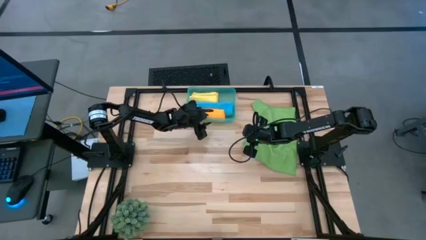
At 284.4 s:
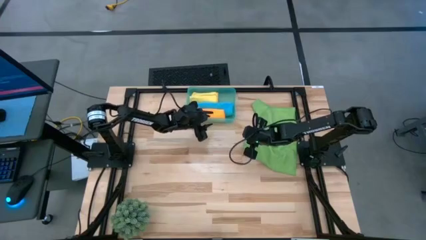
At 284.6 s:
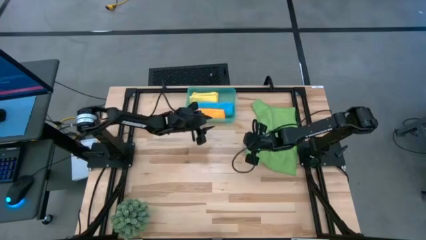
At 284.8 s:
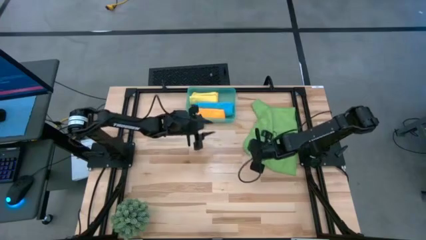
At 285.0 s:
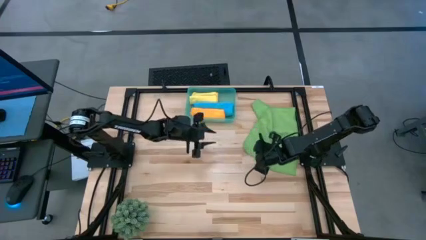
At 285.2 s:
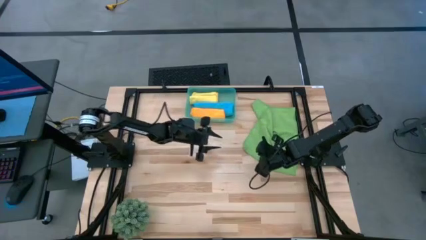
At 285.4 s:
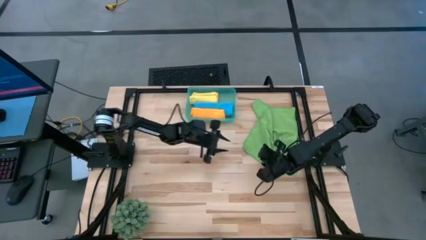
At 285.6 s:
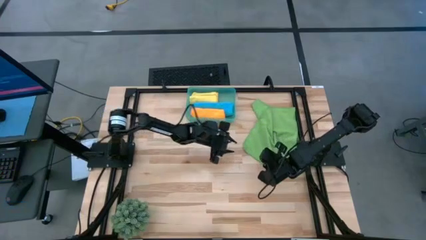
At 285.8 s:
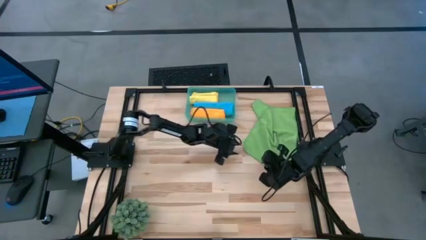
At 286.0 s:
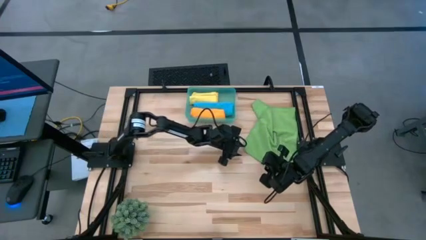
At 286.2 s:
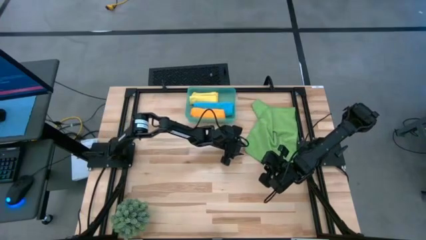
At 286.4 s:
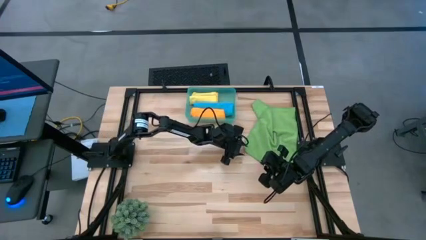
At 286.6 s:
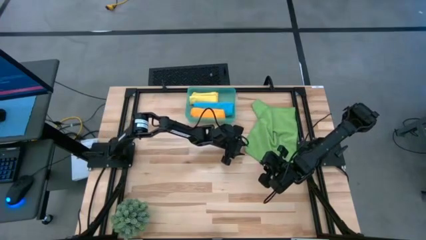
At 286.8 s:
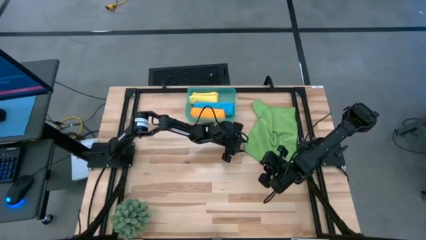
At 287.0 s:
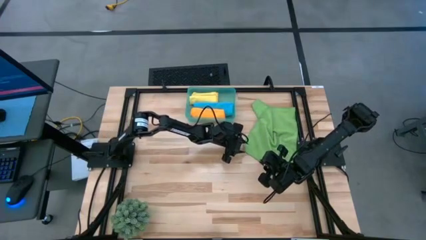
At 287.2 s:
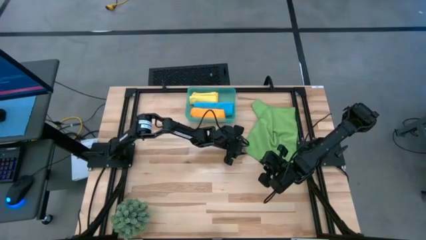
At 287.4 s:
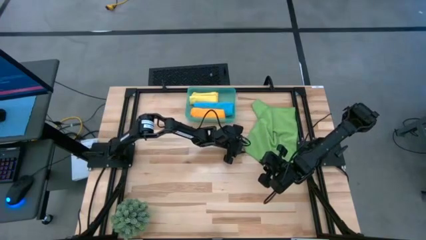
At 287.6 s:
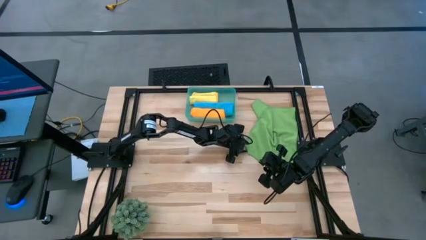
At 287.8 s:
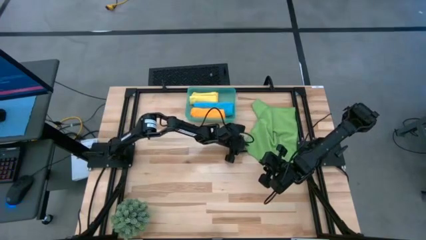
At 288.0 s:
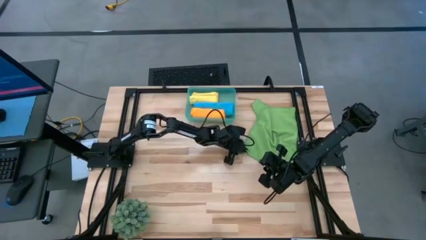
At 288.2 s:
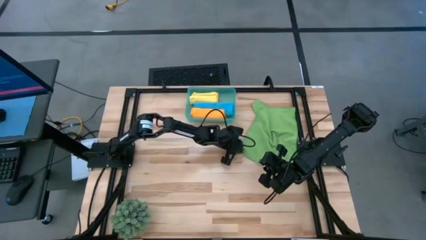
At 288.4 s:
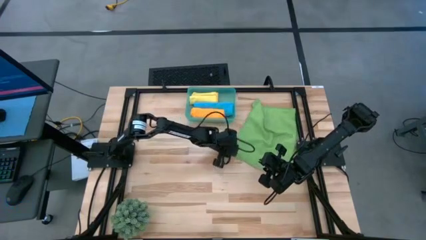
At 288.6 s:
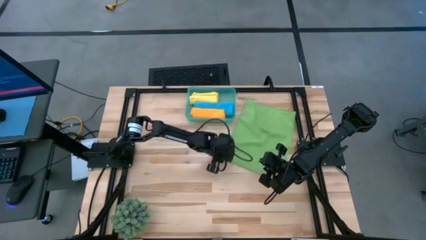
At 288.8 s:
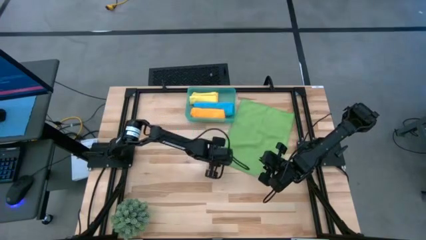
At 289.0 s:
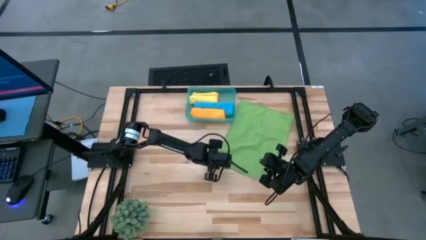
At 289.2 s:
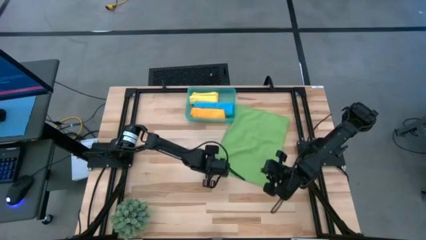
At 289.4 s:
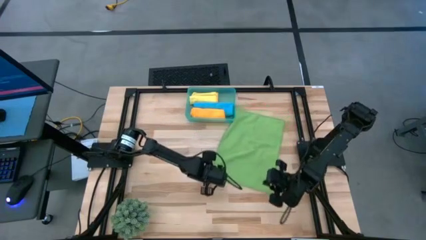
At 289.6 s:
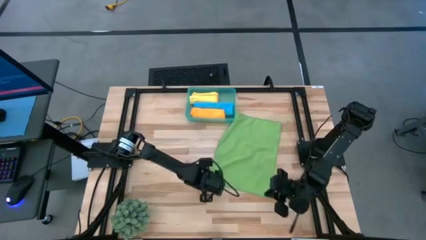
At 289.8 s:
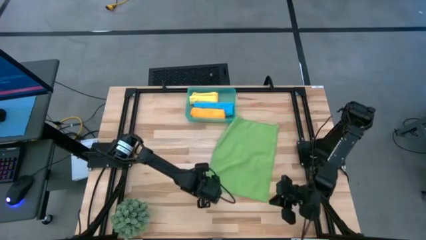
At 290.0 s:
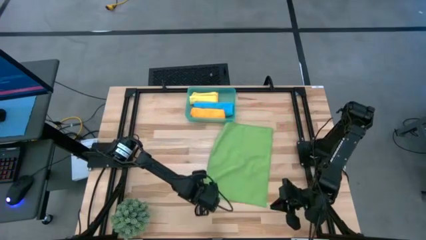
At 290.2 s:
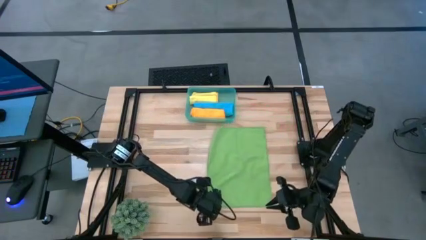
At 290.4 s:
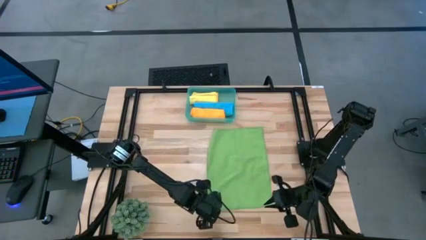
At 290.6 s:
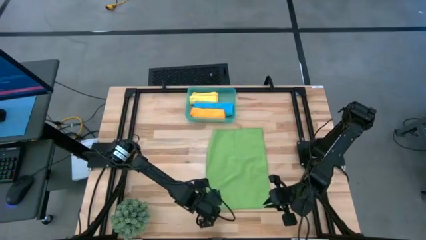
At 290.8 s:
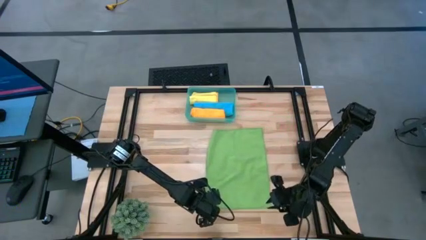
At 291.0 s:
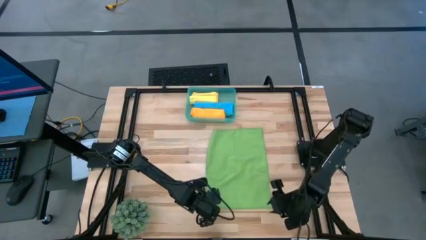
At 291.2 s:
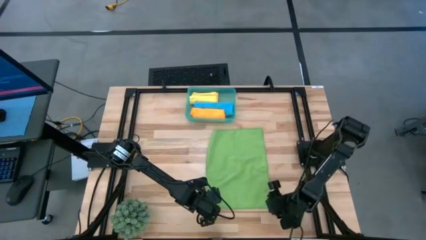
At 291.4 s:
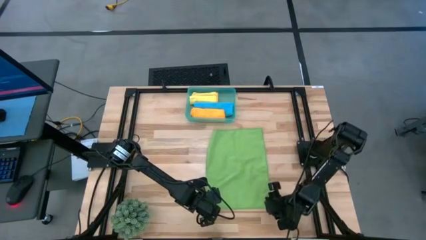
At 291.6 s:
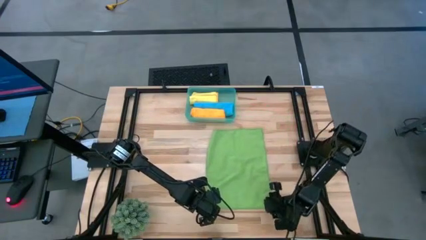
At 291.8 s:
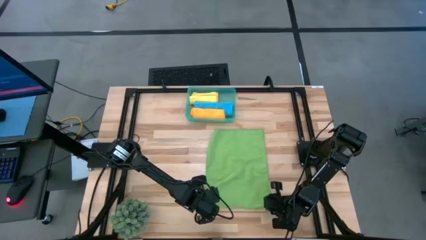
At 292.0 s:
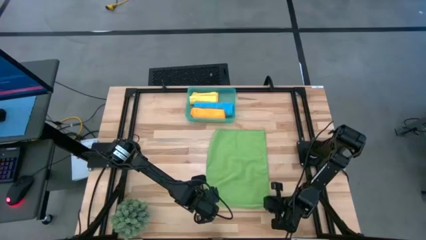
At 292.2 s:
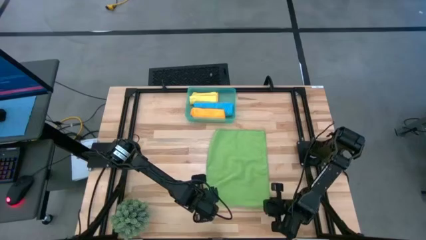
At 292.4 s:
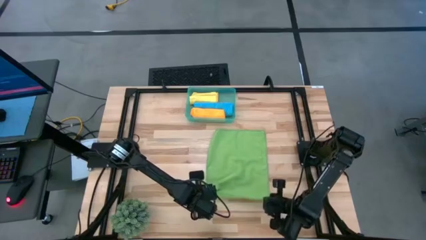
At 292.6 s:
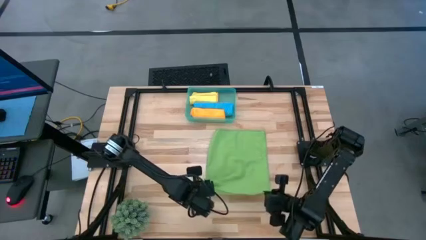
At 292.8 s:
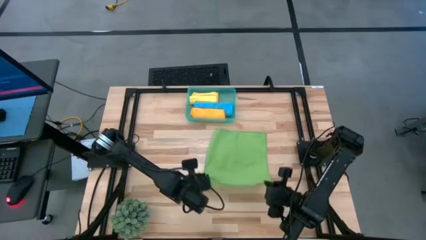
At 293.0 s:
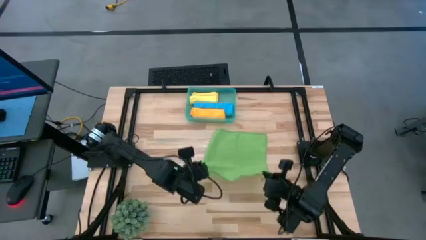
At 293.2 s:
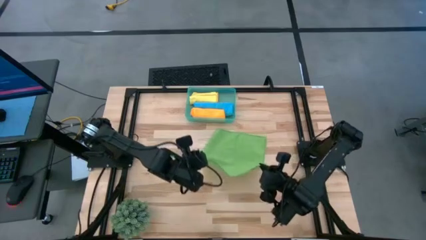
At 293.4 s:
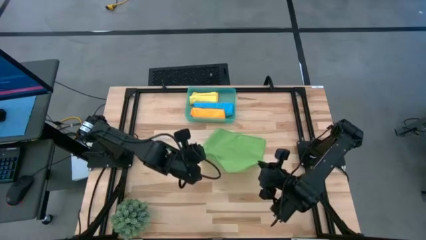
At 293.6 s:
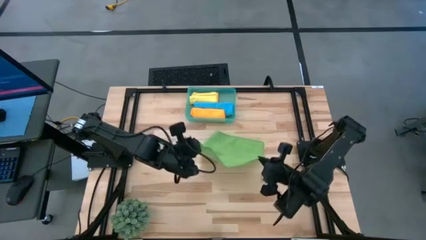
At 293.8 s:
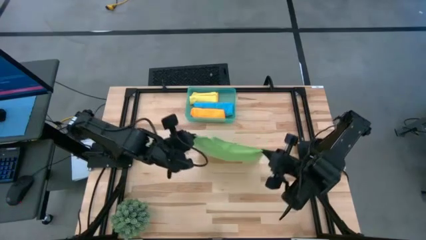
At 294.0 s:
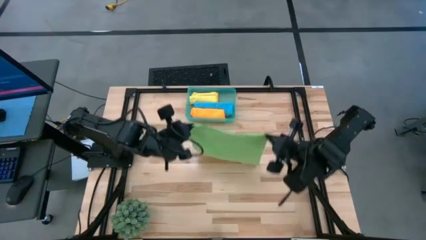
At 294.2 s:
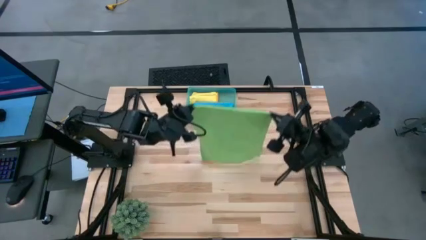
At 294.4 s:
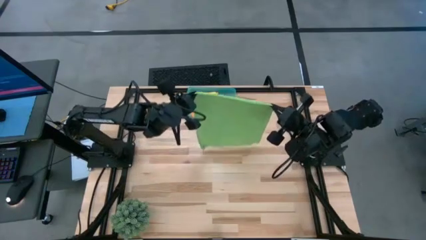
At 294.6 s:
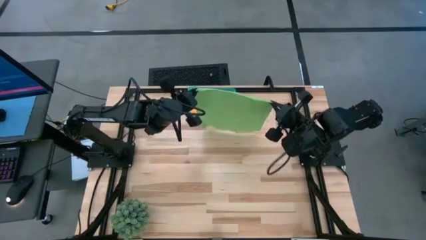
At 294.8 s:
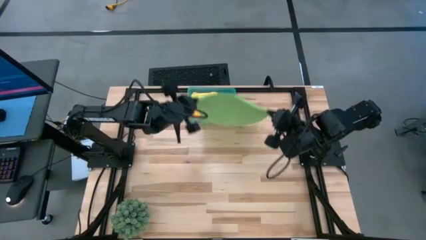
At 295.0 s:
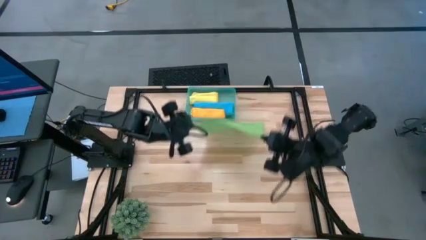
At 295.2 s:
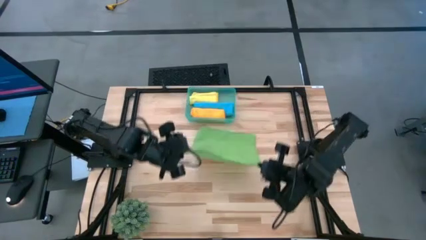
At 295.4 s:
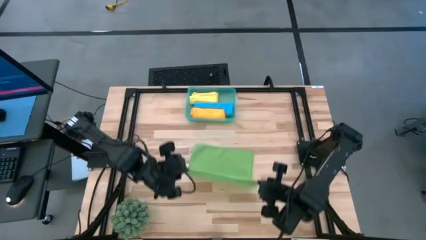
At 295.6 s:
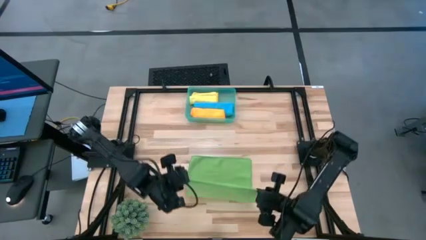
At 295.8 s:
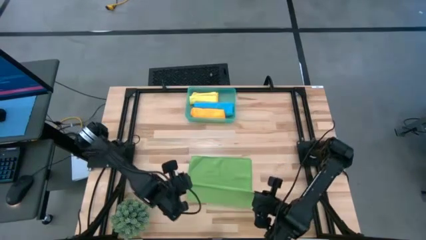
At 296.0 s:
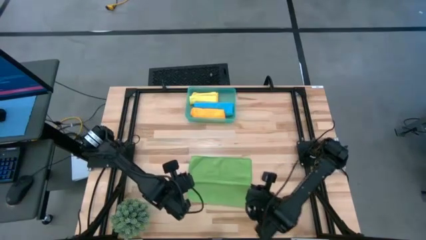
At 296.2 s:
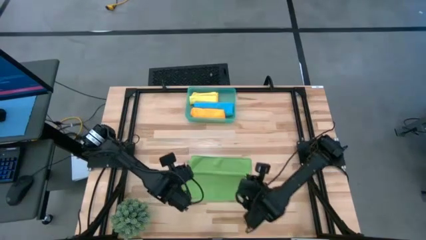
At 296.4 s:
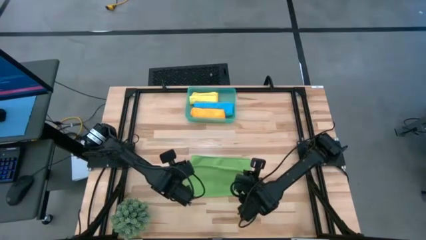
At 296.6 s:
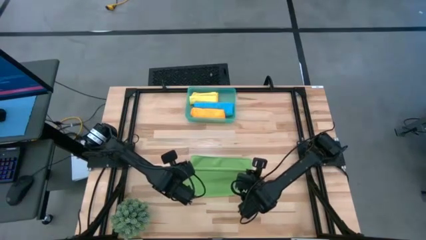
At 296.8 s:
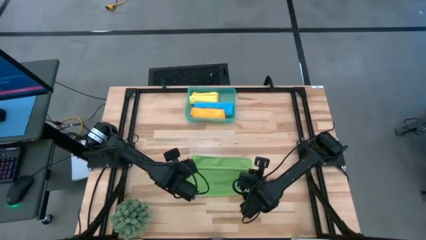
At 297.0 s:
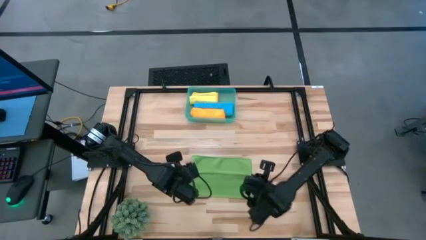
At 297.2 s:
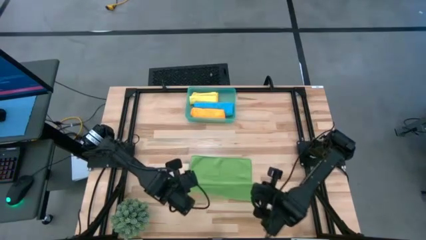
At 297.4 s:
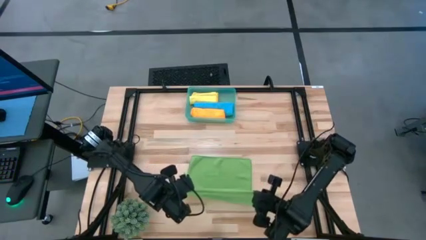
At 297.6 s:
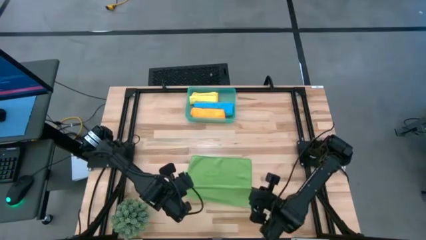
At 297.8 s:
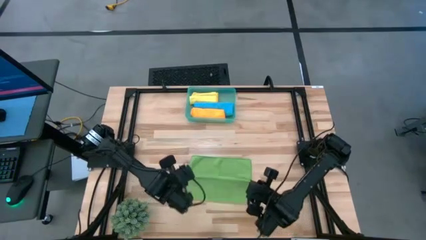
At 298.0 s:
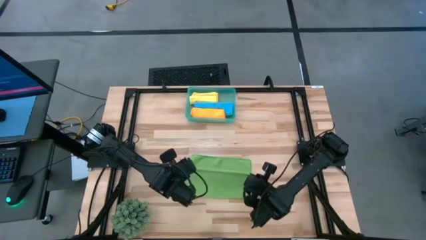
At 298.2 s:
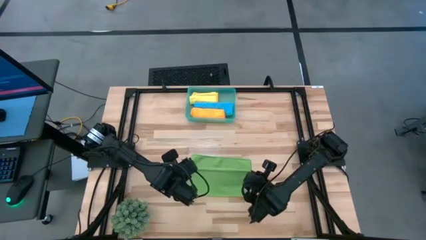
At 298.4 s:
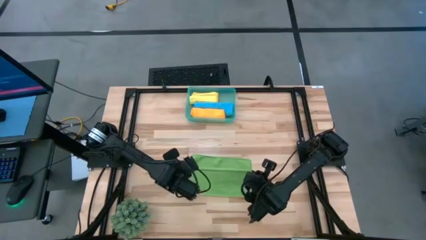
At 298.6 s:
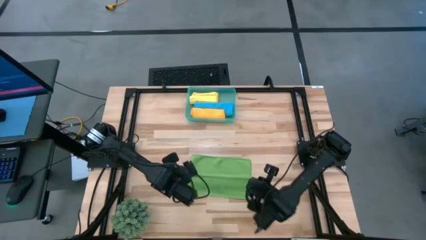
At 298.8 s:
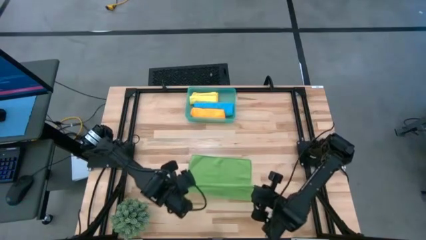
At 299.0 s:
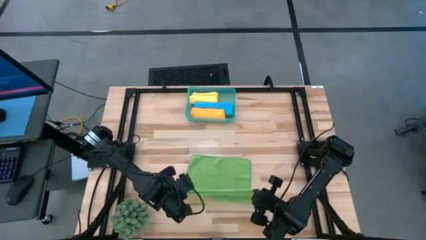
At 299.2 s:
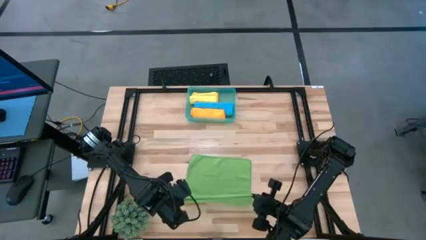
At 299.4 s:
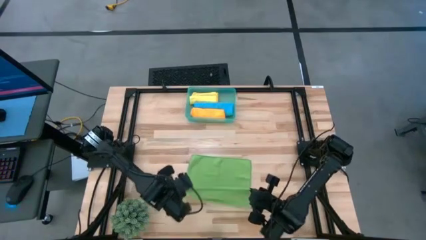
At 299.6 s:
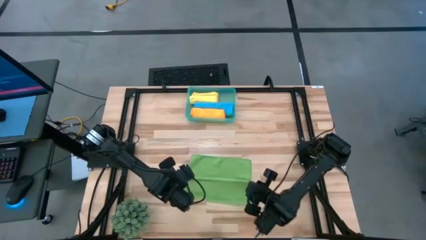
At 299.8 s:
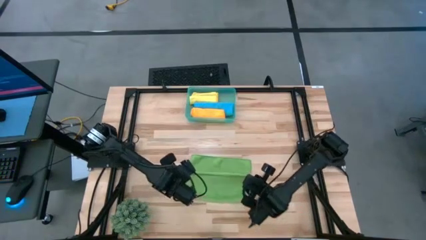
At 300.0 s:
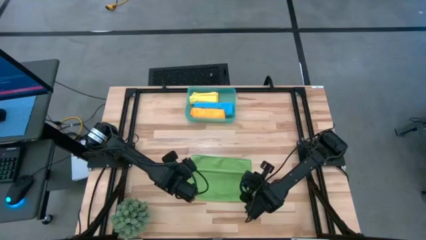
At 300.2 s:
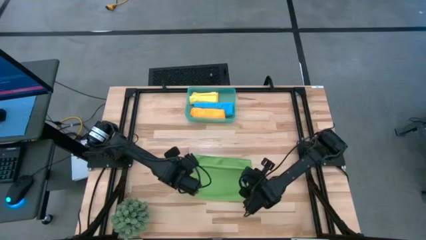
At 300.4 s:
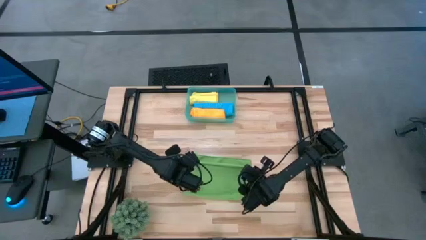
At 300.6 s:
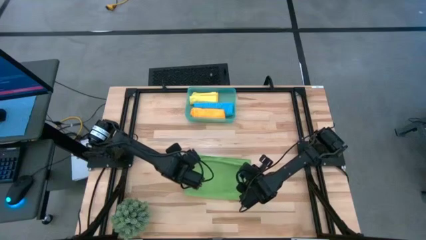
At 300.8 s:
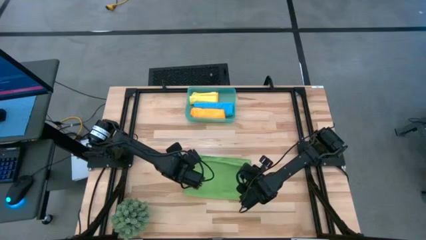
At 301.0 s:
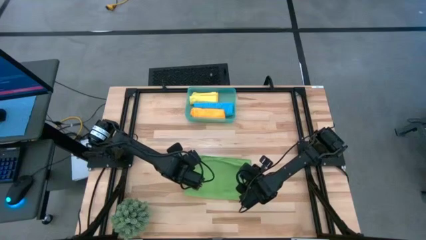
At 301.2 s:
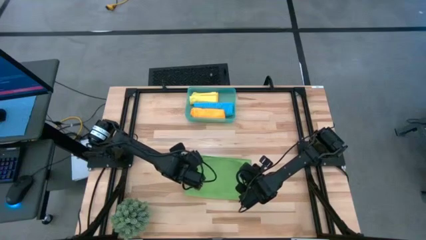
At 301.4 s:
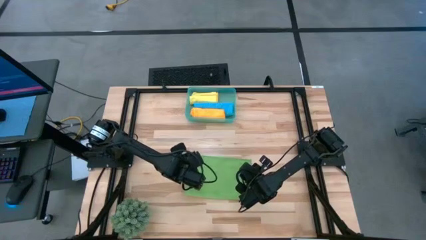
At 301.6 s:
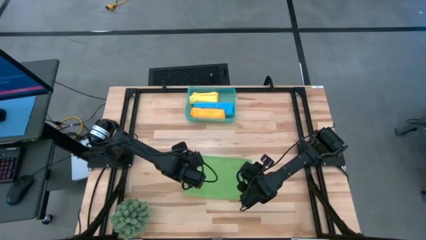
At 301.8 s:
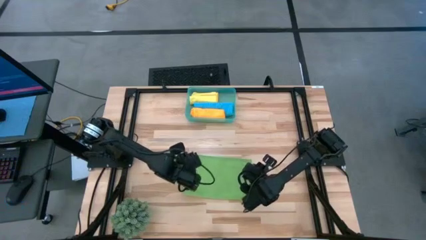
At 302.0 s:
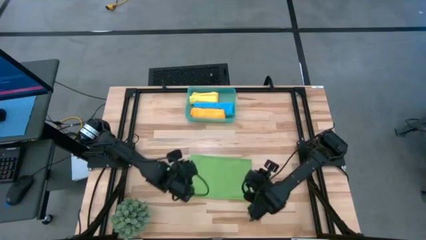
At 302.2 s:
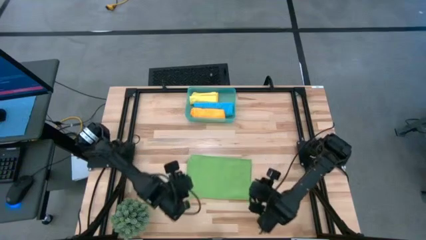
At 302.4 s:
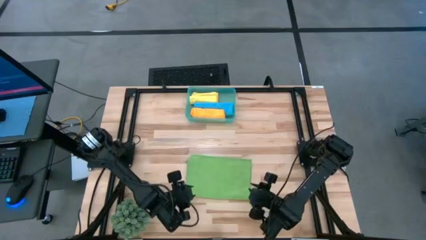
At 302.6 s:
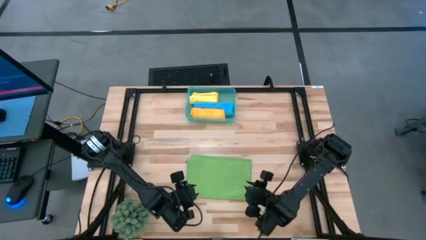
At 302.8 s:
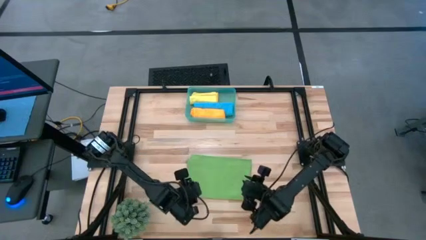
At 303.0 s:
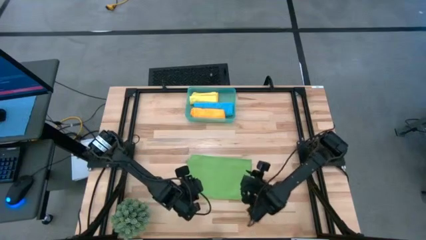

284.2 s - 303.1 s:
Task: Roll microfiber towels into tight, uniform cylinder then place into a basket
Fold the green microfiber towel
